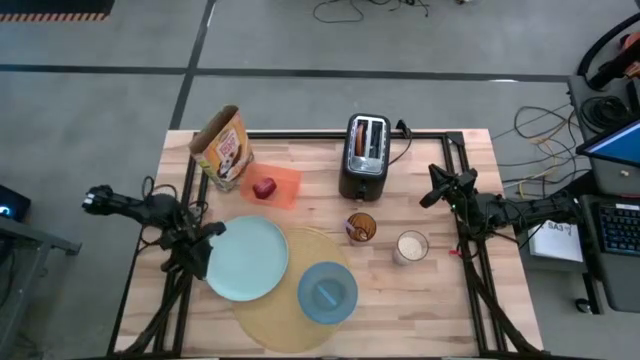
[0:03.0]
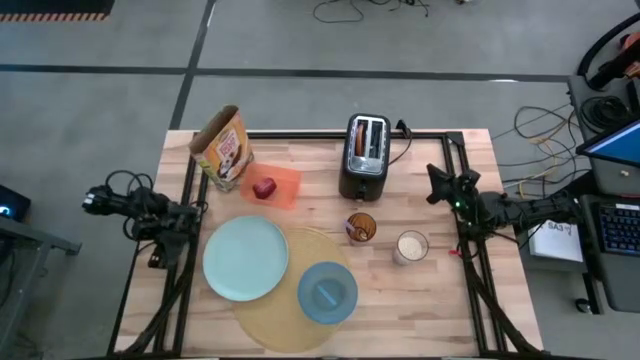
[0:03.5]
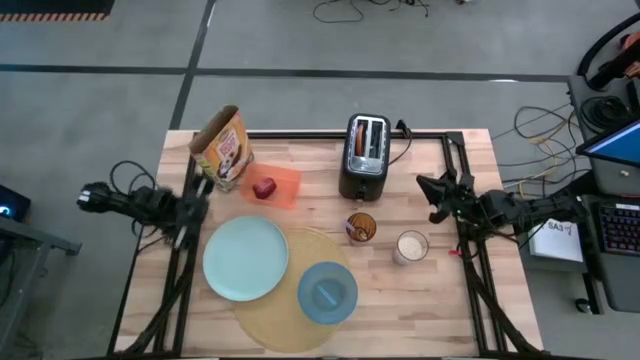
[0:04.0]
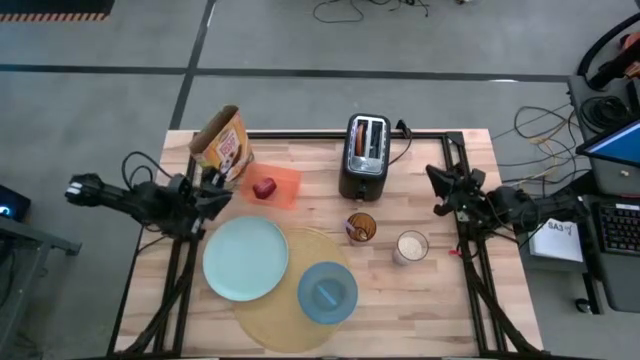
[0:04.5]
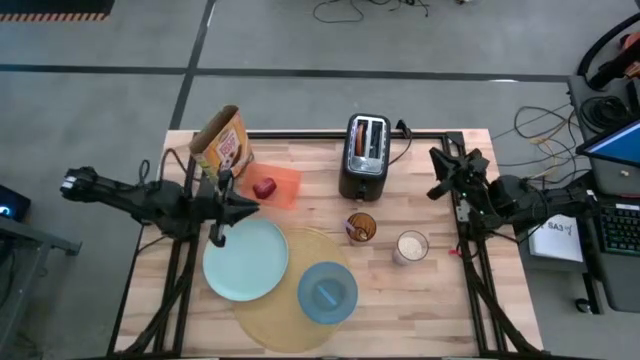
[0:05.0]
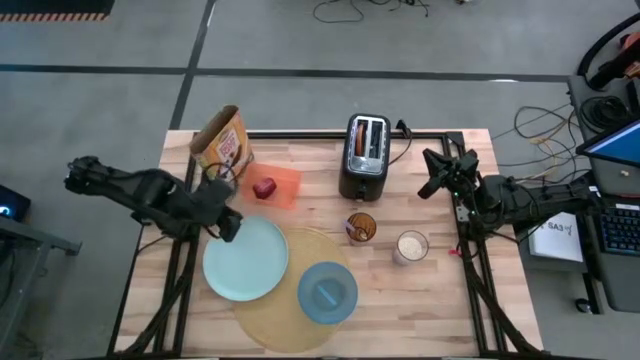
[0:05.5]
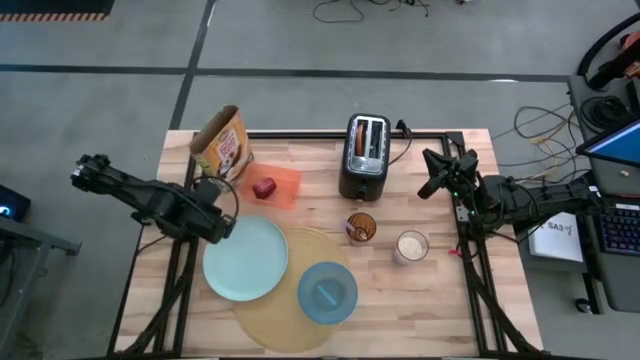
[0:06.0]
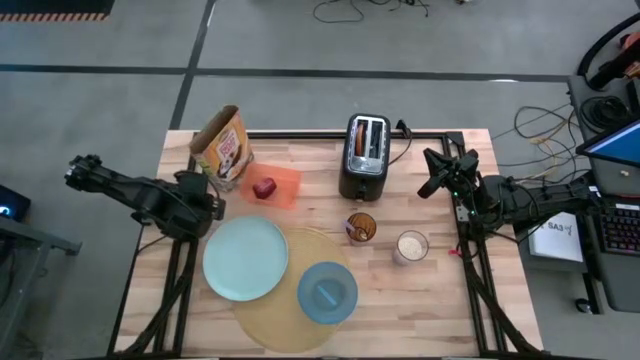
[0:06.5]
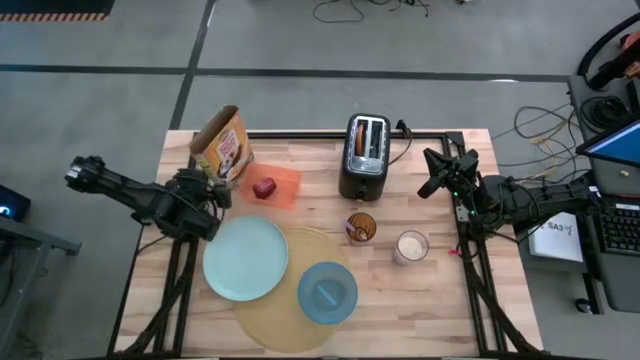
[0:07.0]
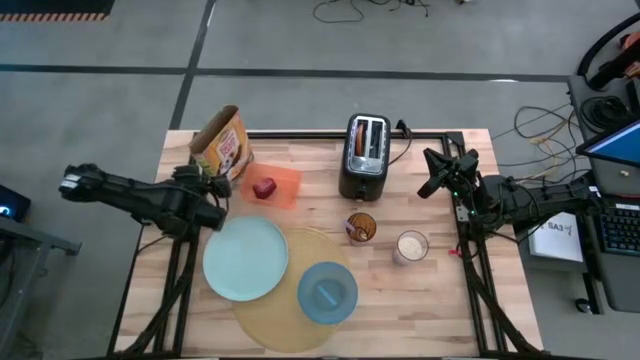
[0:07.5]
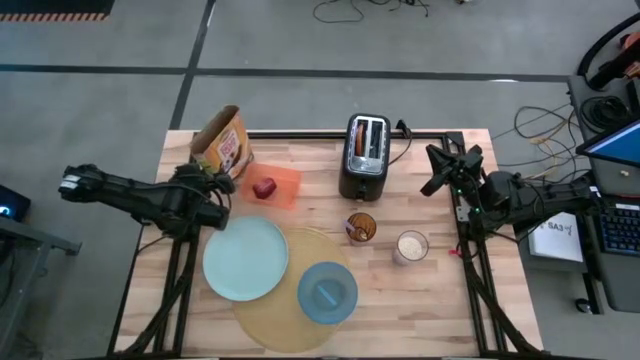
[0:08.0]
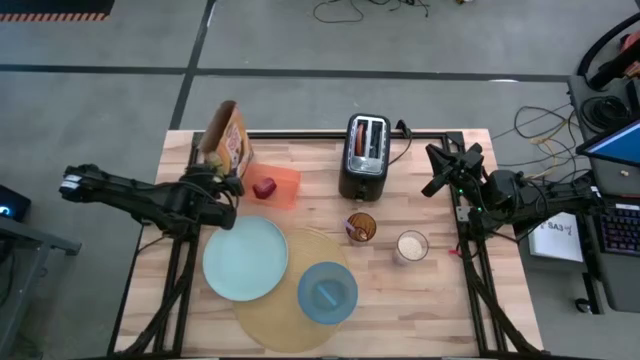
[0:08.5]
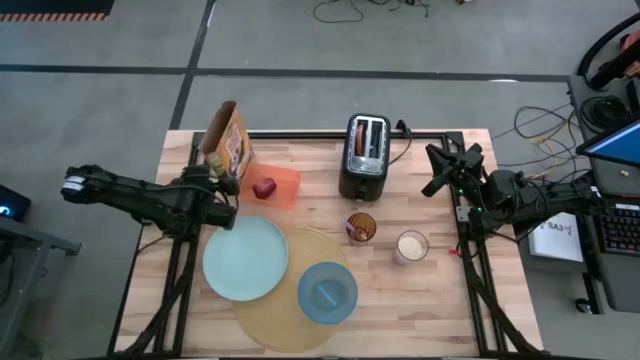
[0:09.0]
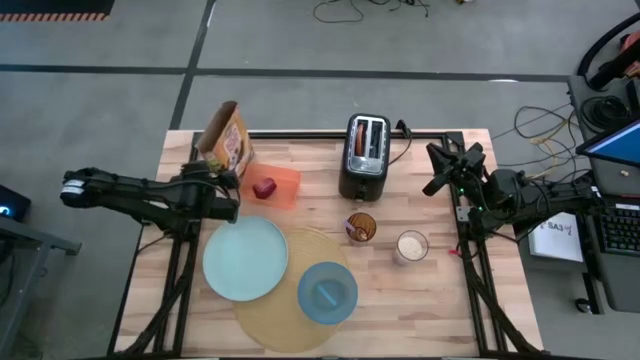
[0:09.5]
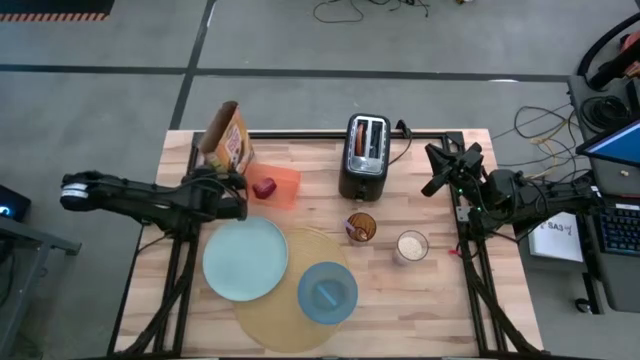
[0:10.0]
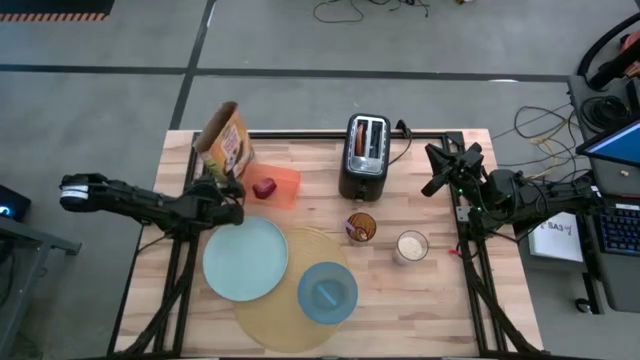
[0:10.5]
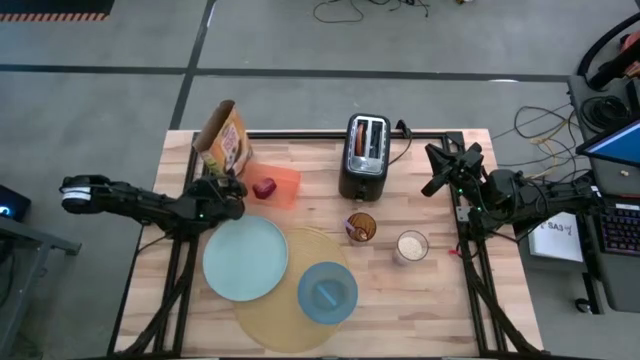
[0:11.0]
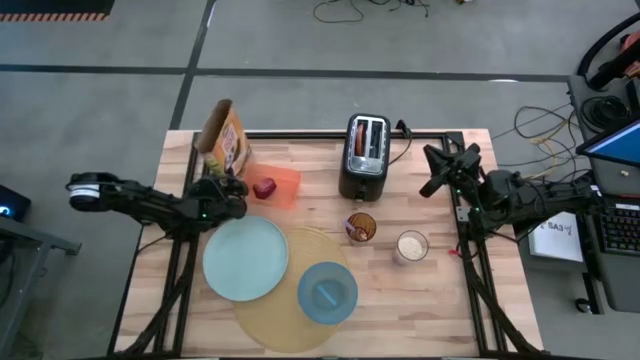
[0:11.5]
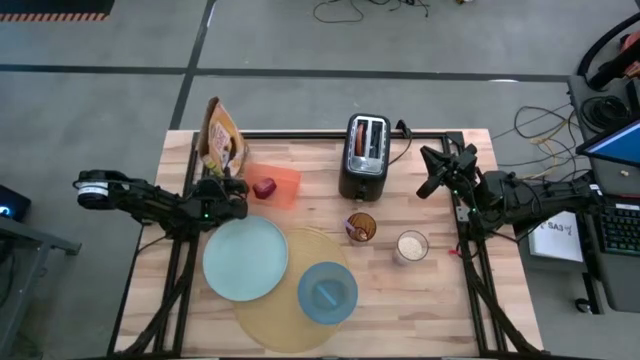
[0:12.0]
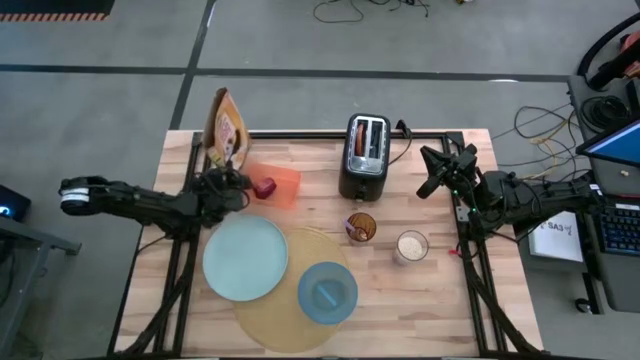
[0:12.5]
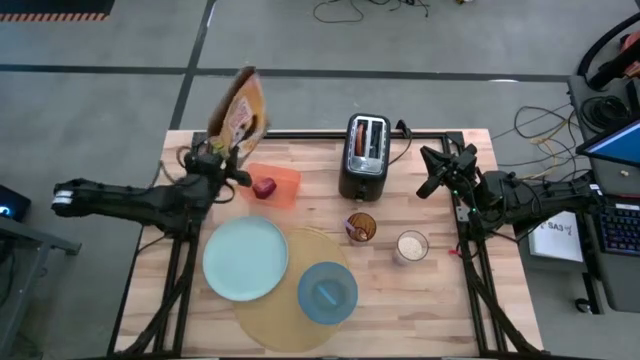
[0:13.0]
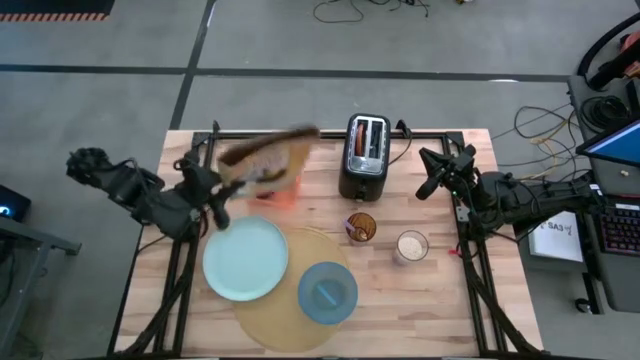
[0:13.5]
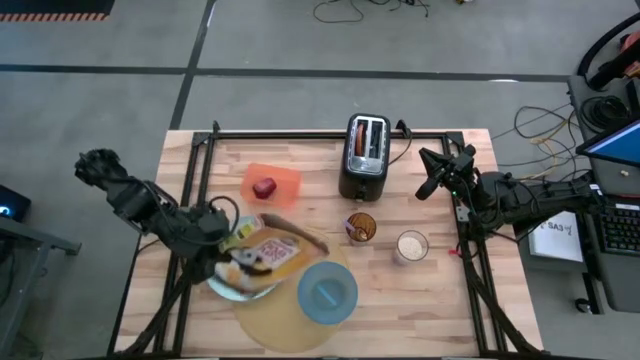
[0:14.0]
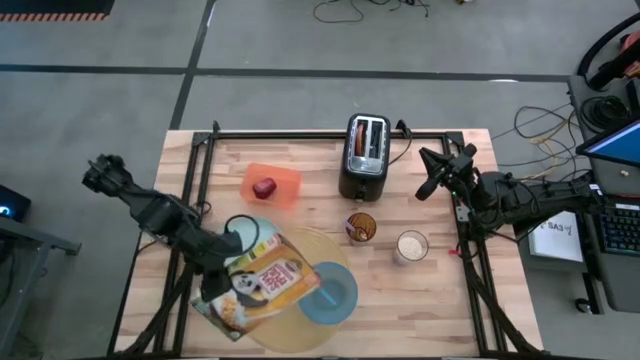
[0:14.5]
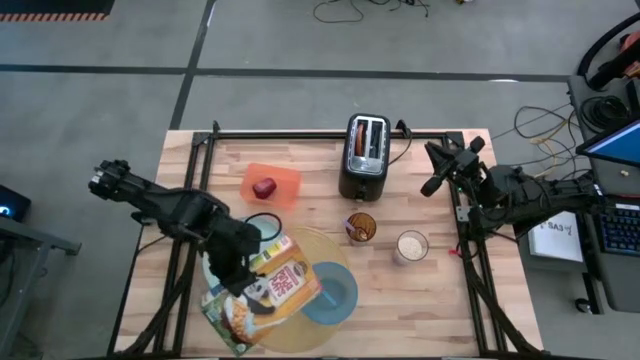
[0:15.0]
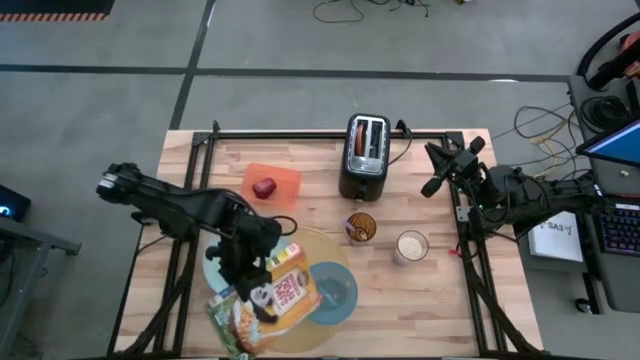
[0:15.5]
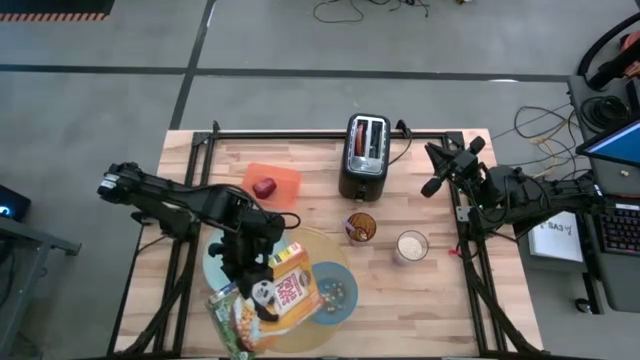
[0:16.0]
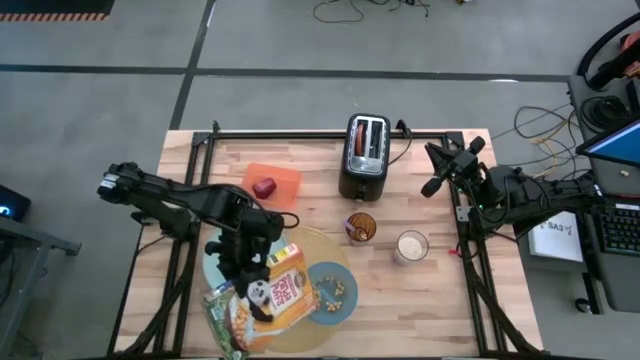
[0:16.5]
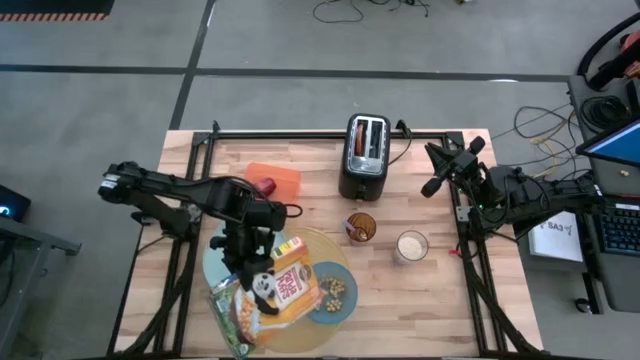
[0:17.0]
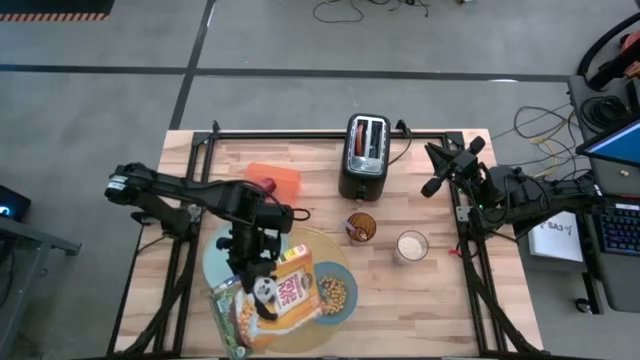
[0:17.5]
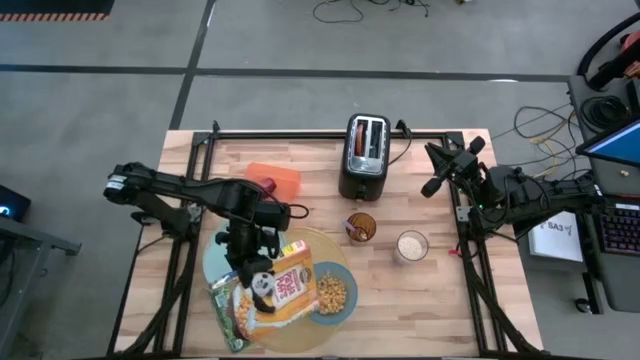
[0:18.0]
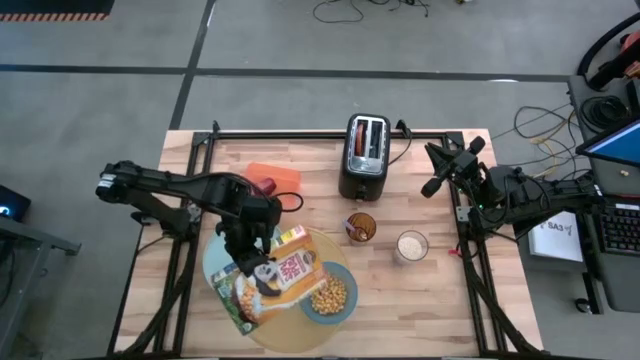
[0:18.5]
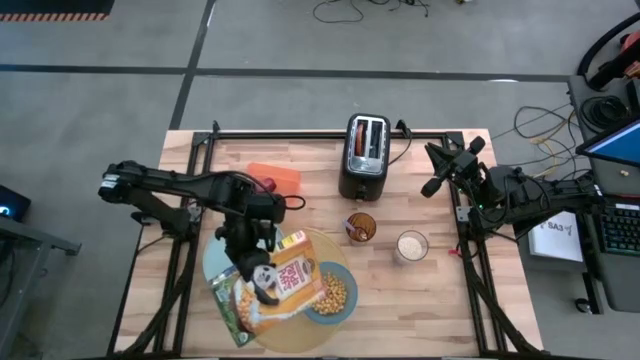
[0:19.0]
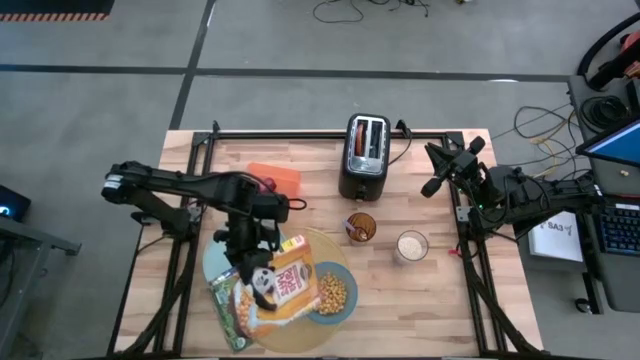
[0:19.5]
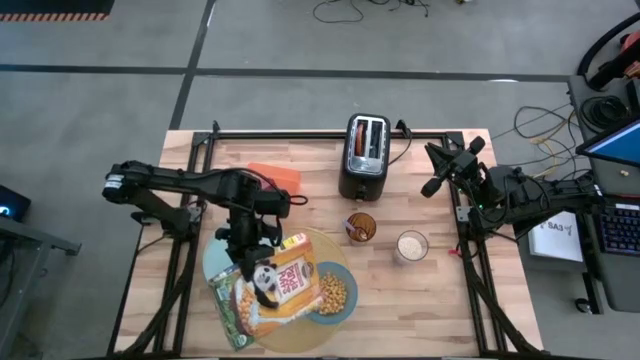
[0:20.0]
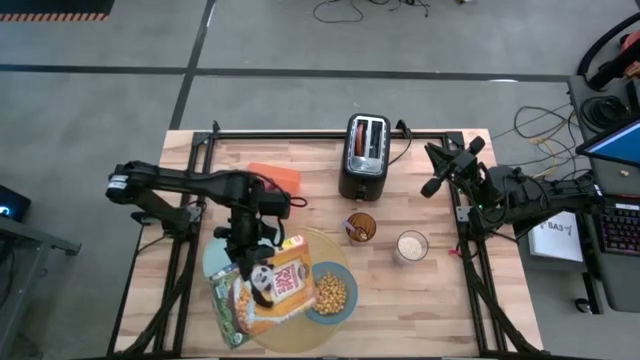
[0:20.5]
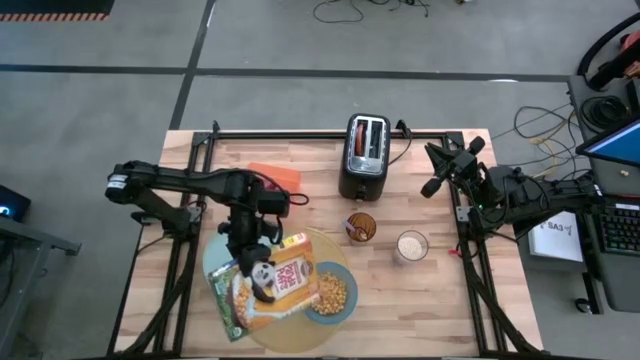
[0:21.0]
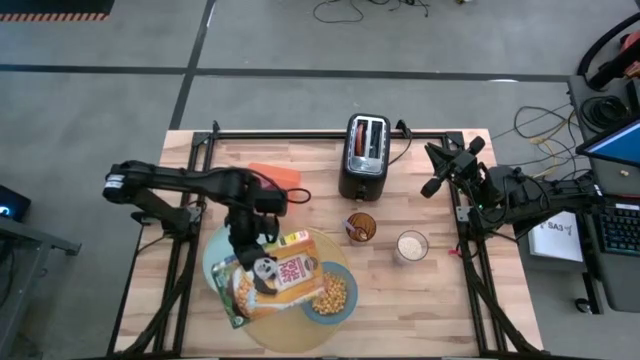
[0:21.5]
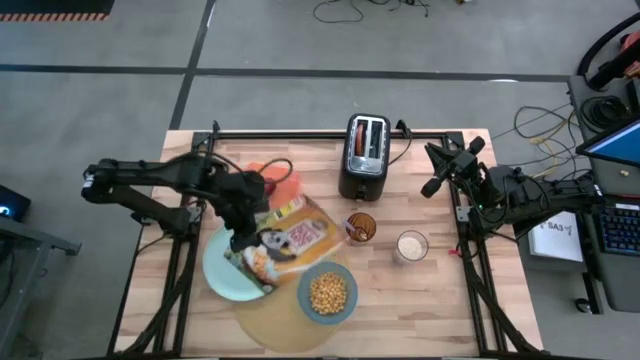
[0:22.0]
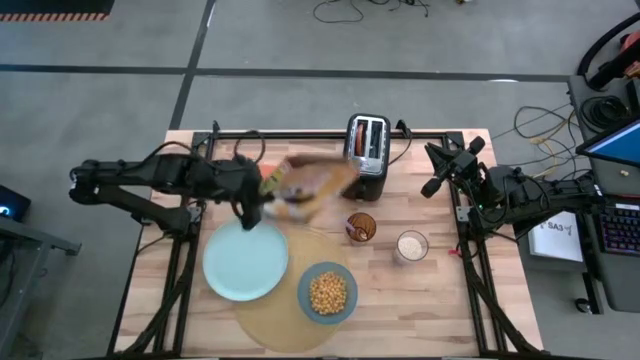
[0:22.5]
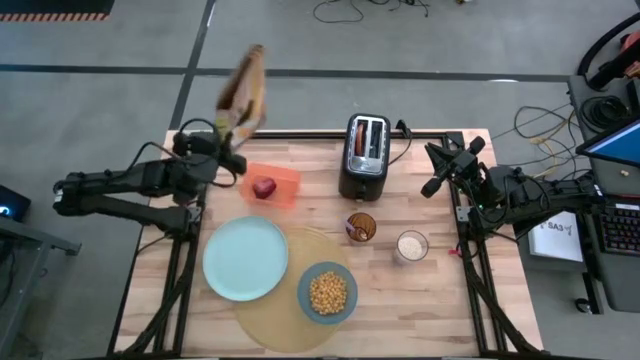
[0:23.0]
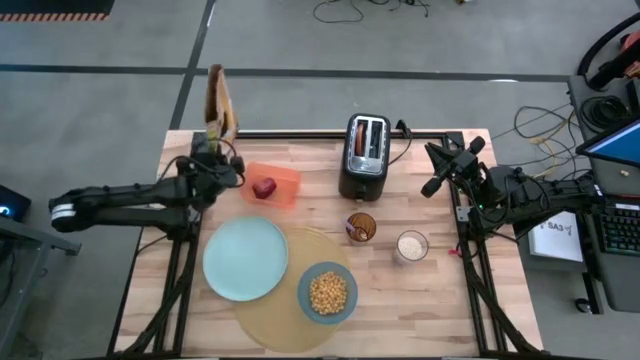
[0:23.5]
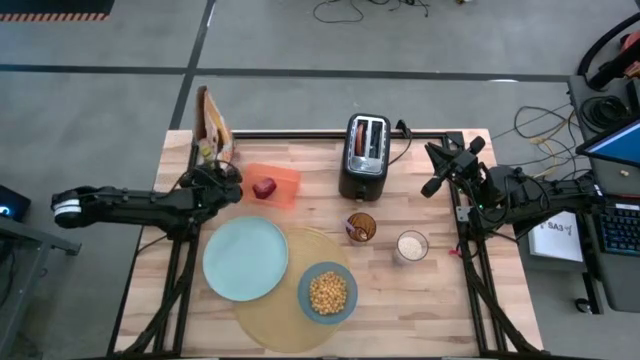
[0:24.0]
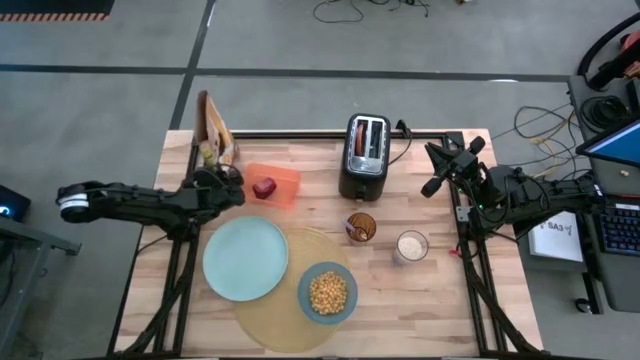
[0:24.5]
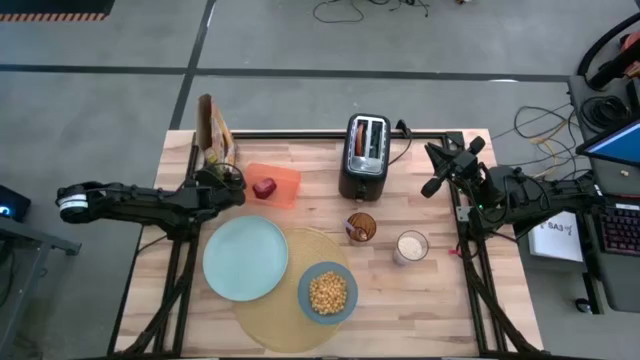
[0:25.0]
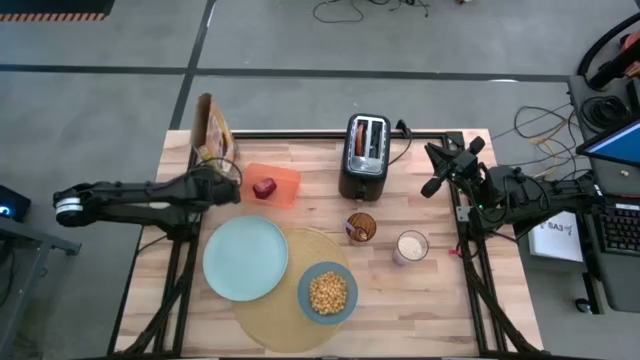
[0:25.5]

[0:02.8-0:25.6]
Task: Arrange a breakfast setting
Pour the cereal from the yellow cereal box into the blue bowl
